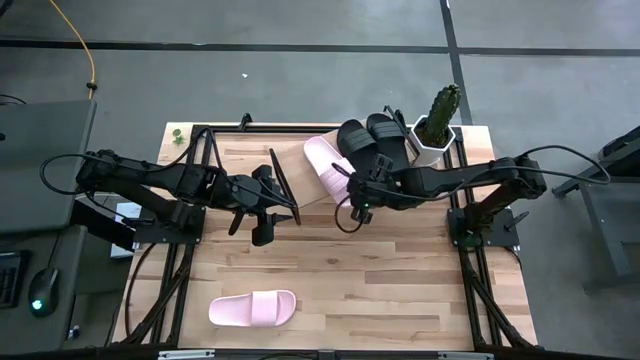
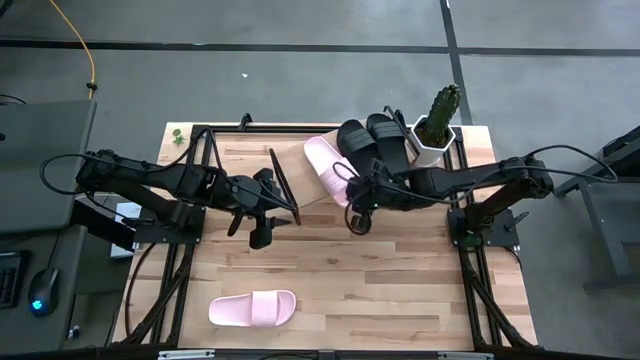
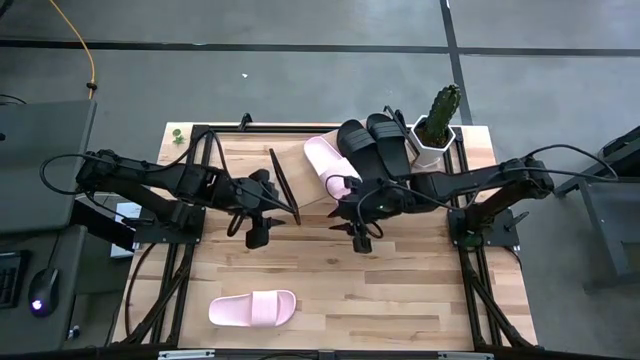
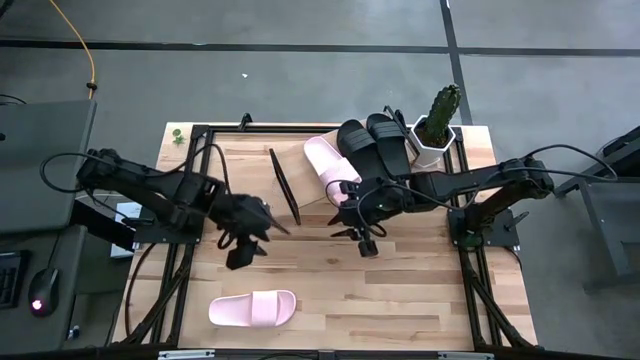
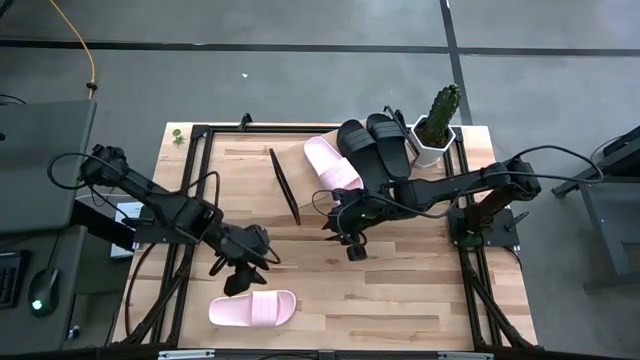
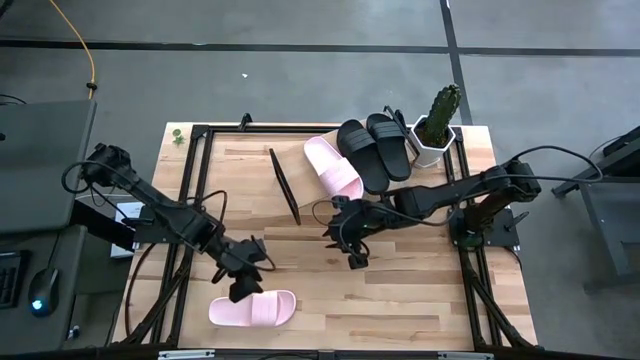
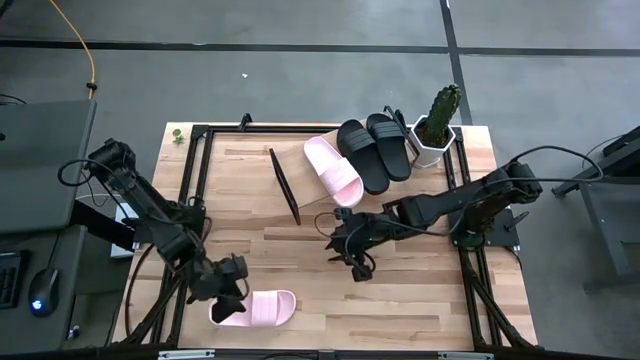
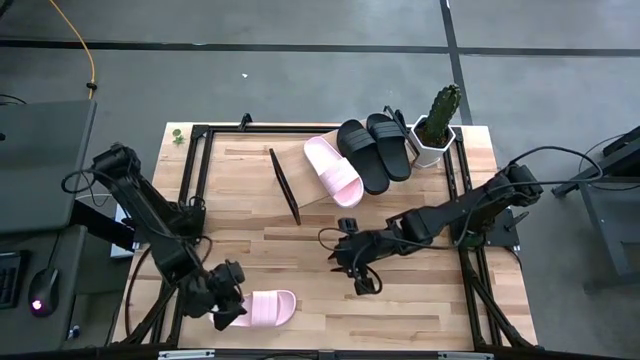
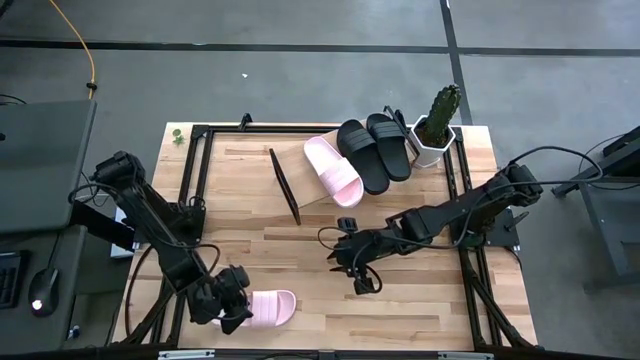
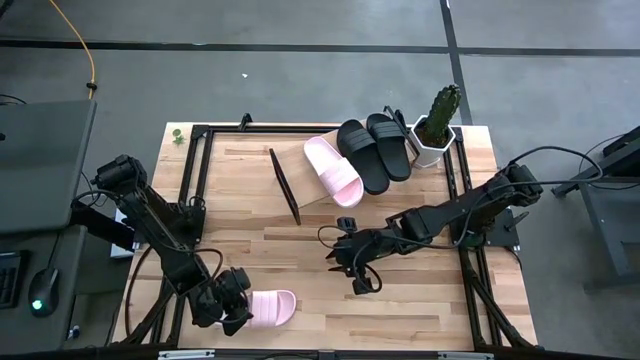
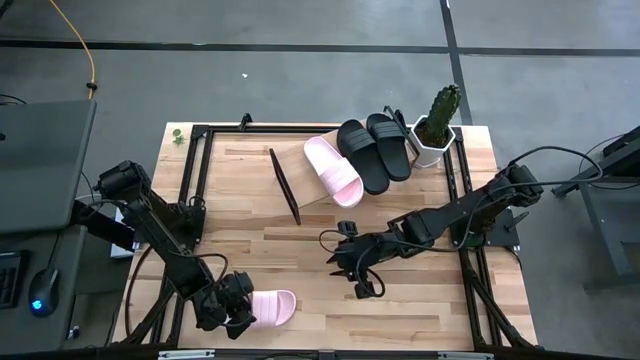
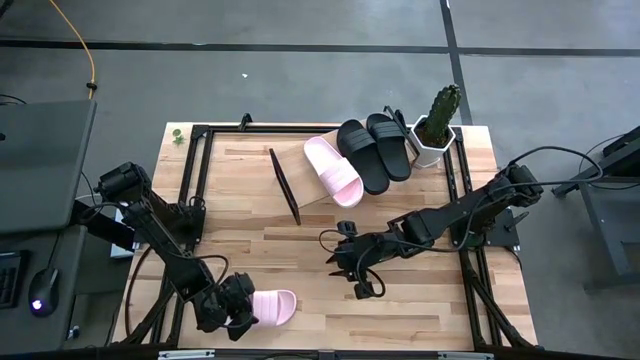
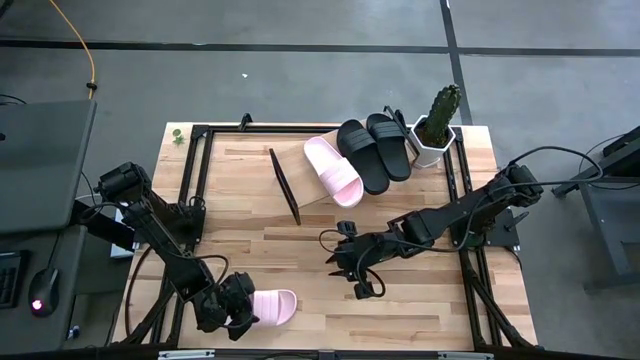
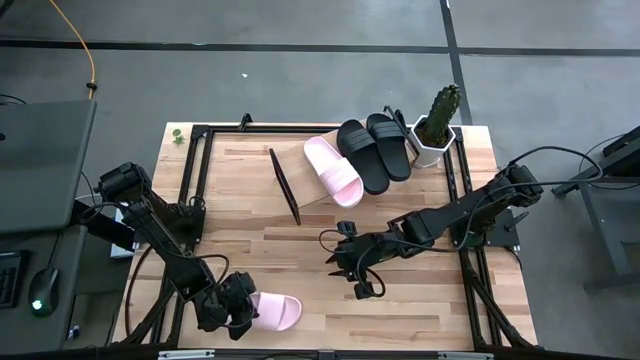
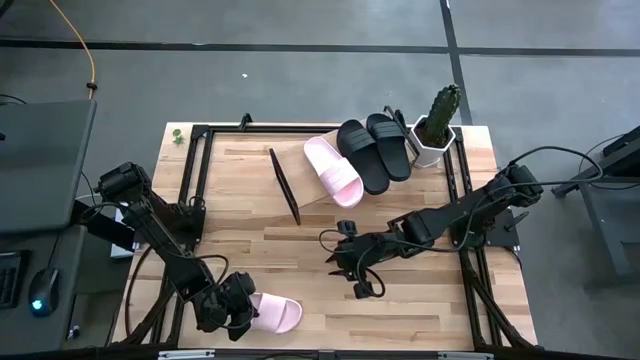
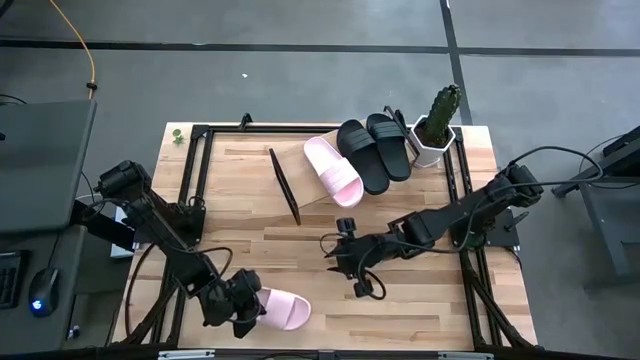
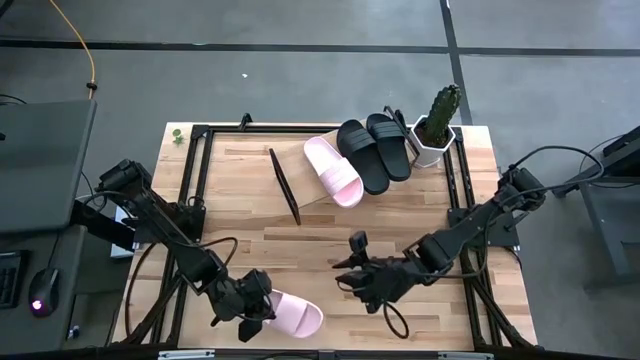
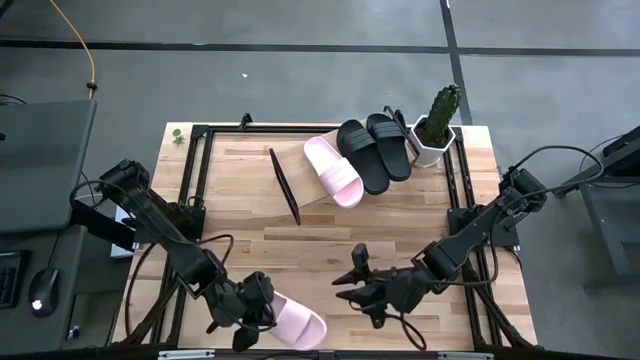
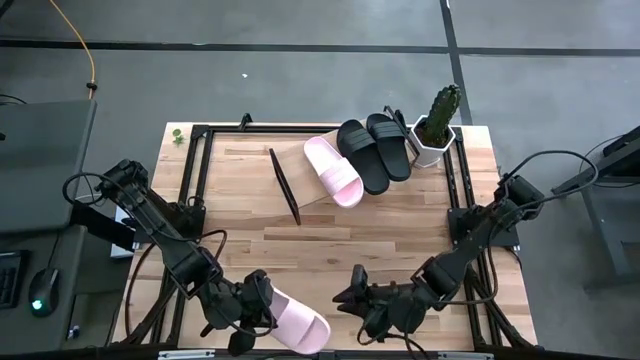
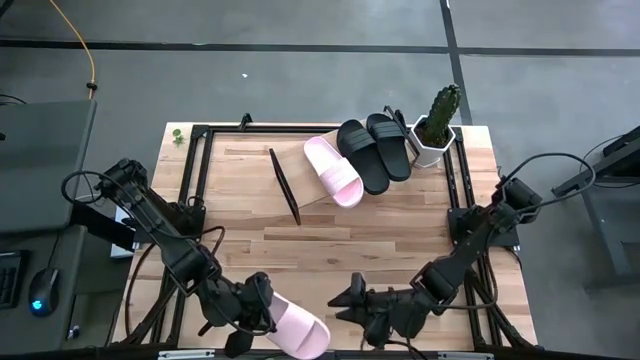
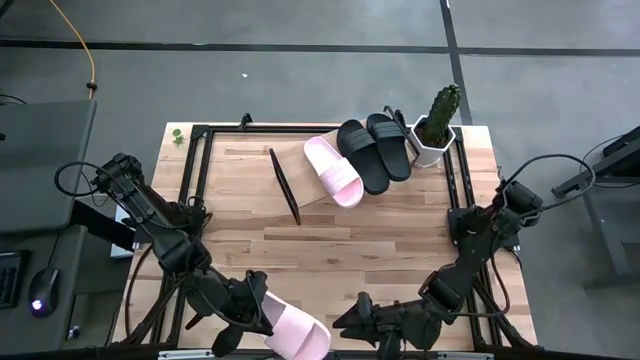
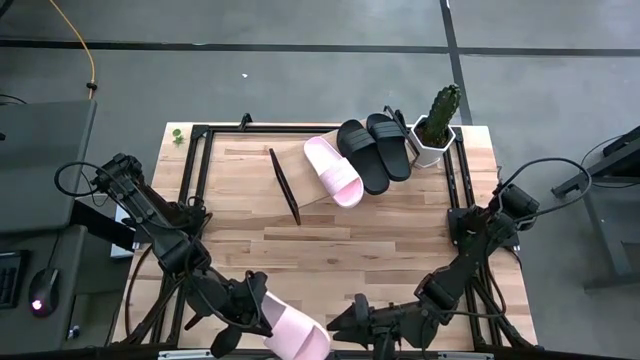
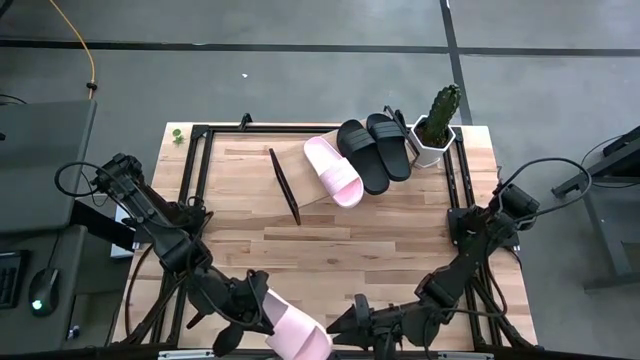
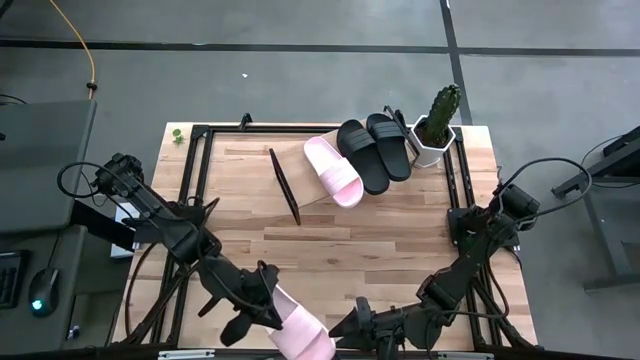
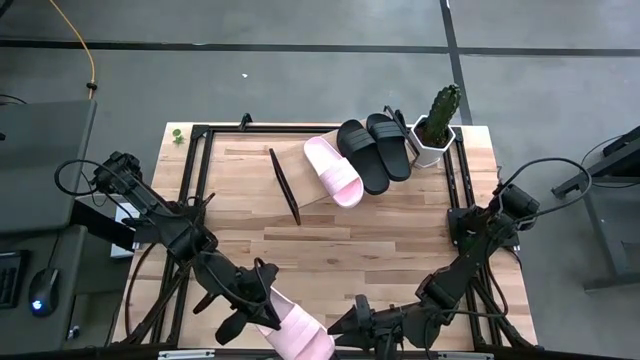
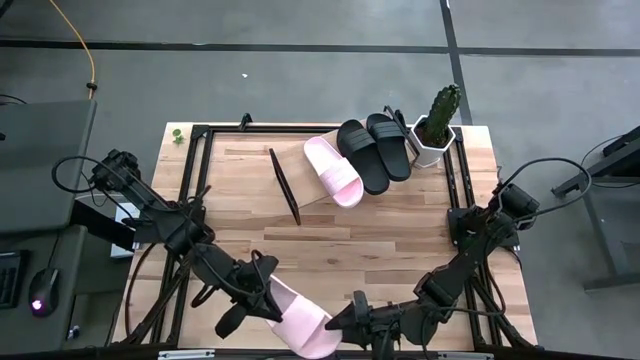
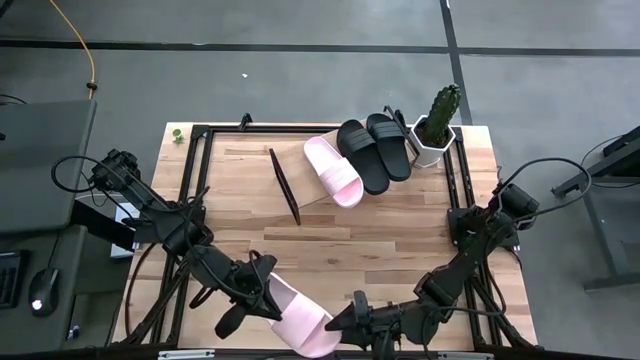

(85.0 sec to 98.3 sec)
Task: Pick and place slides into the shelf
Put the pink slide on the shelf

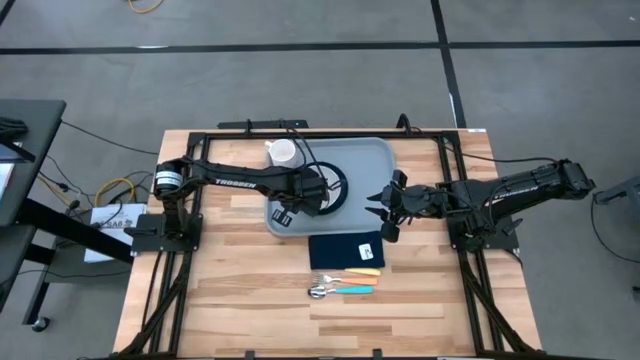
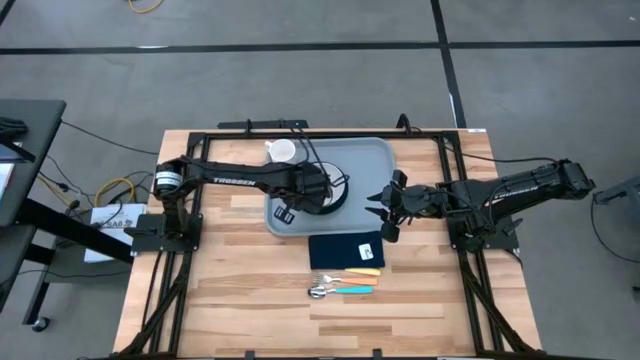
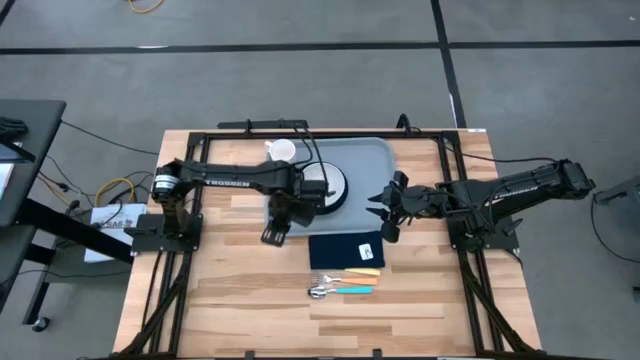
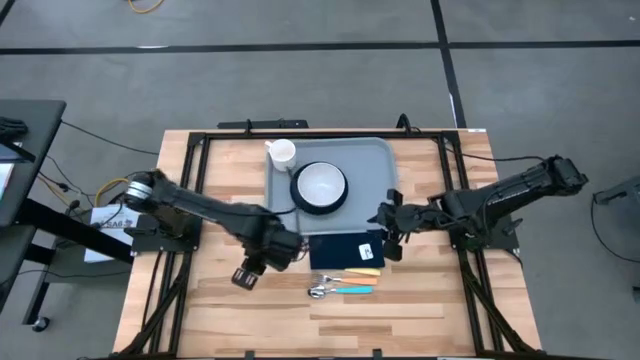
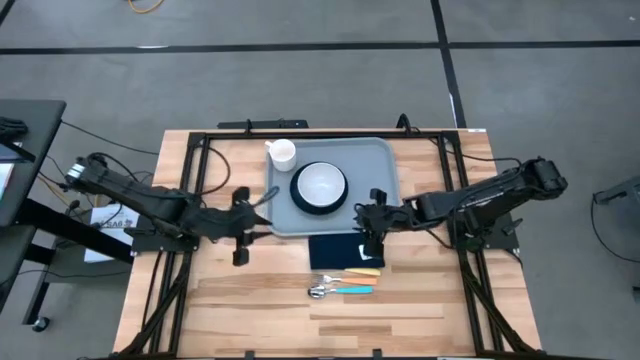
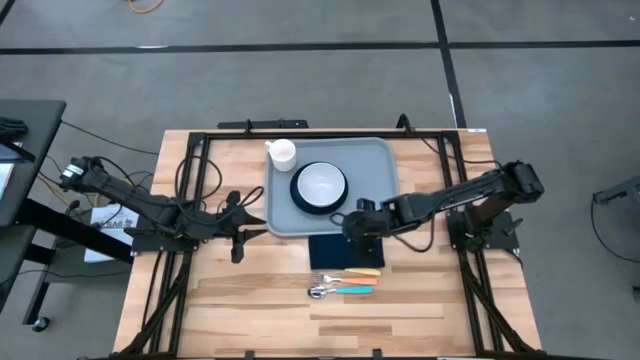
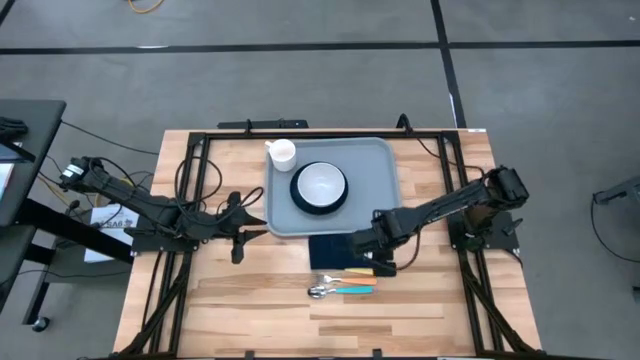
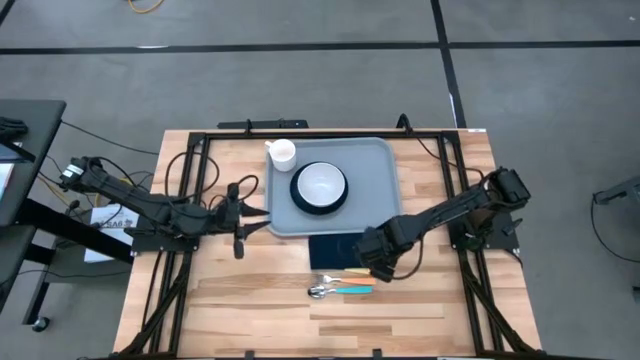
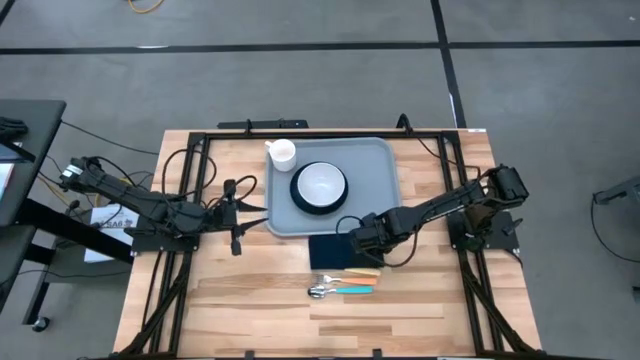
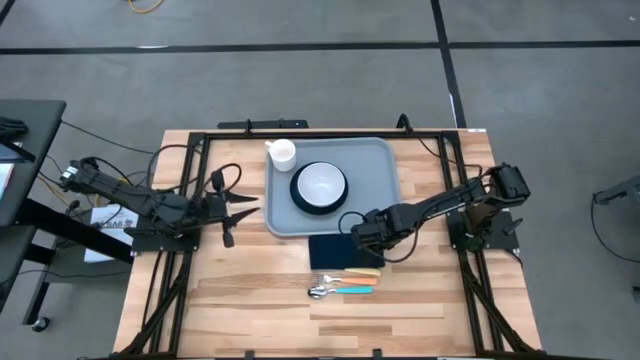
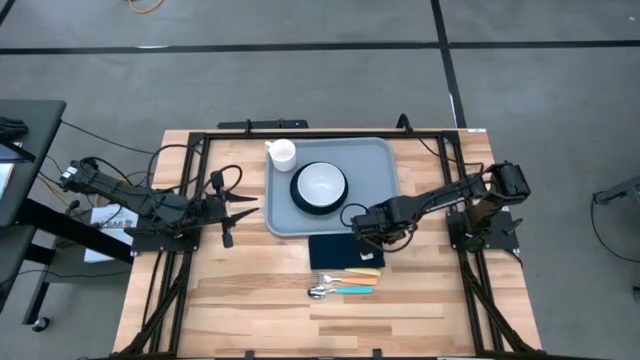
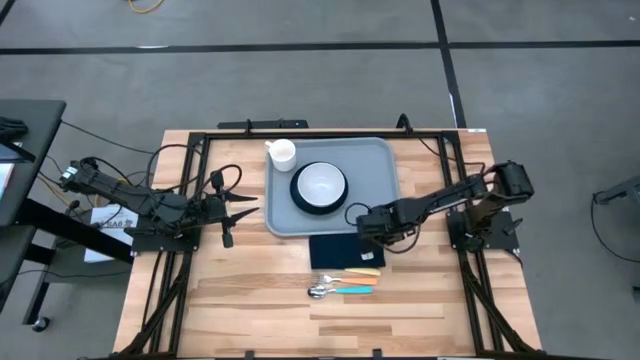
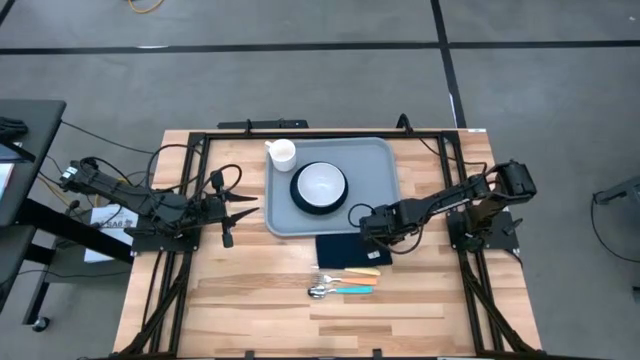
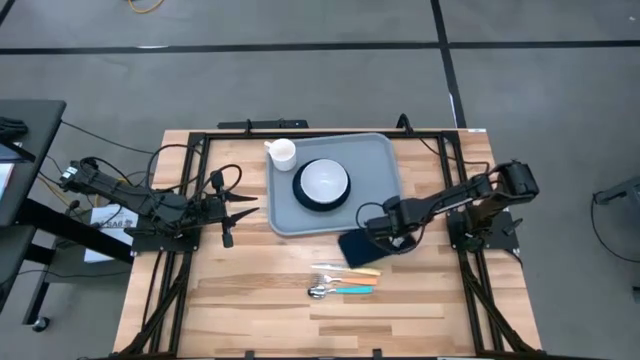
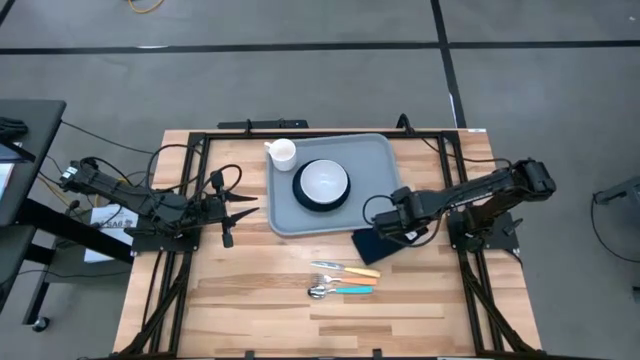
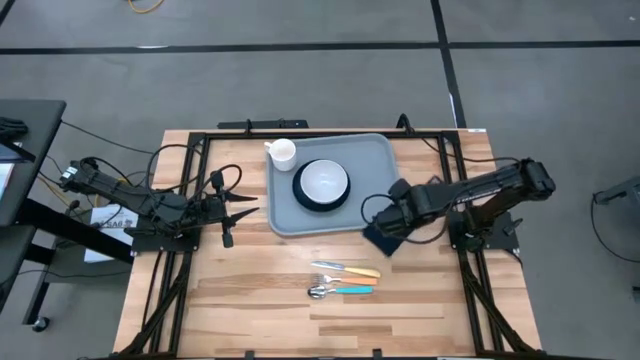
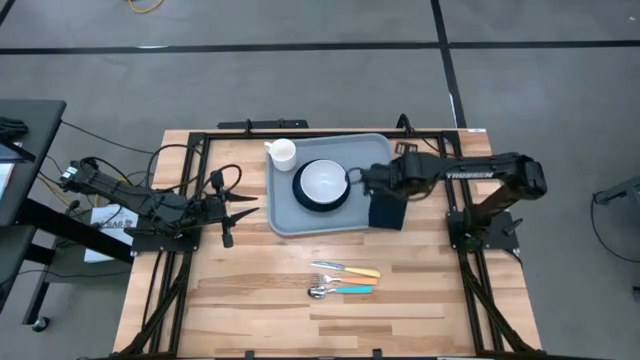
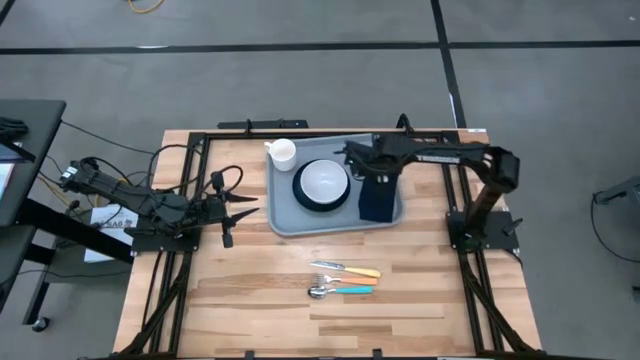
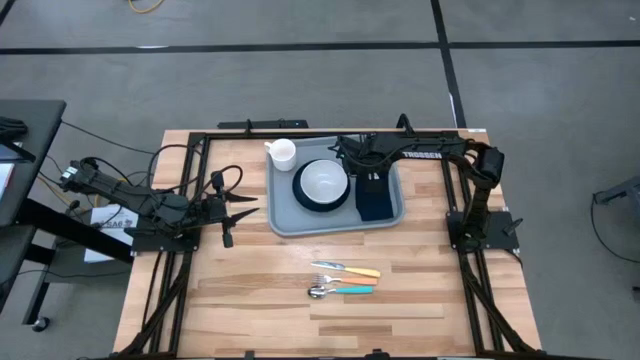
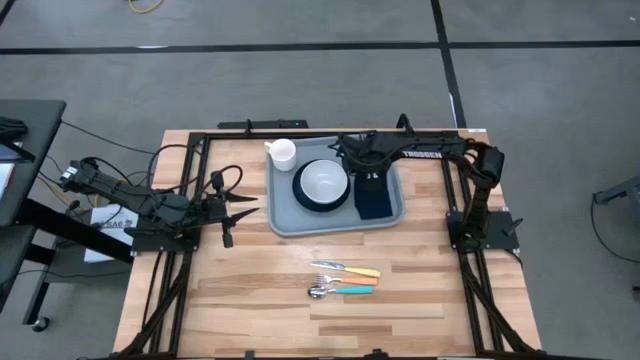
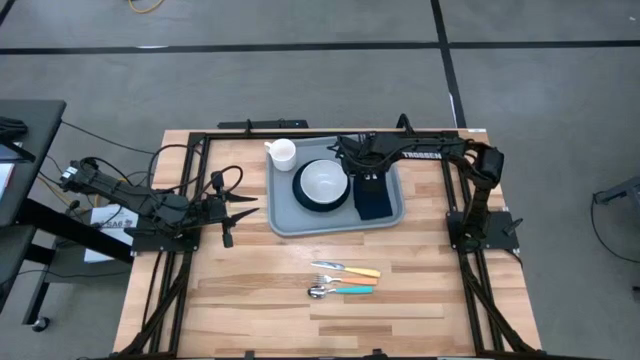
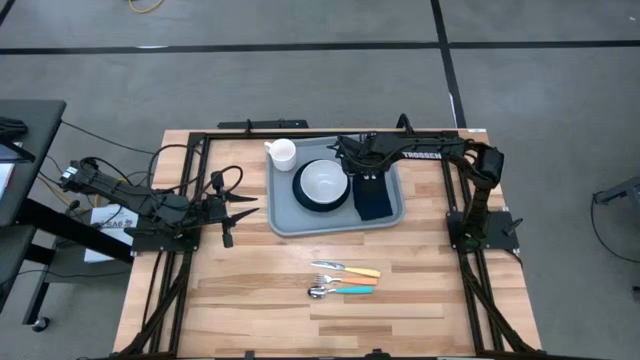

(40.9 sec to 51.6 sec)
Task: Set up tray
Put the dark blue napkin on the gray serving tray to the right of the black plate
